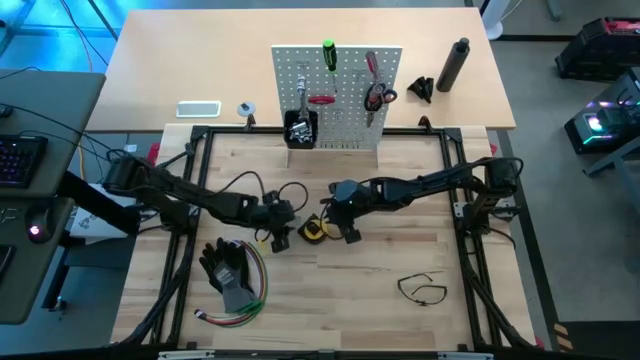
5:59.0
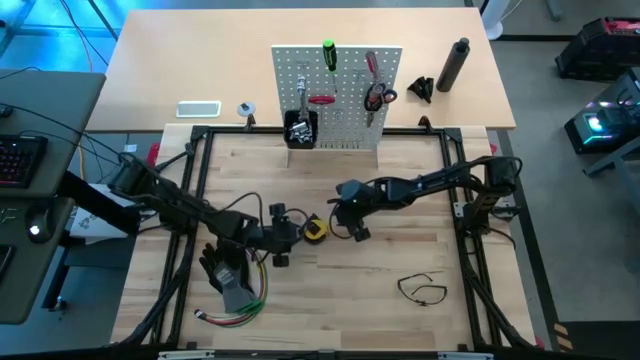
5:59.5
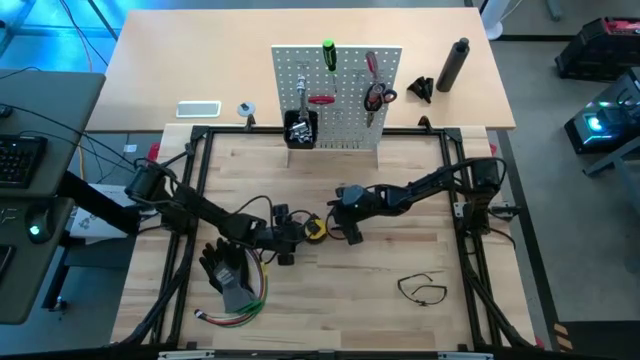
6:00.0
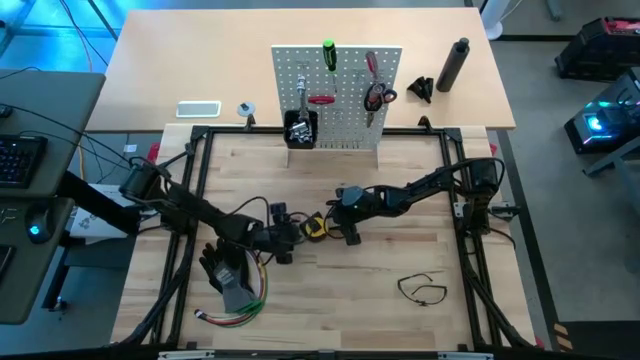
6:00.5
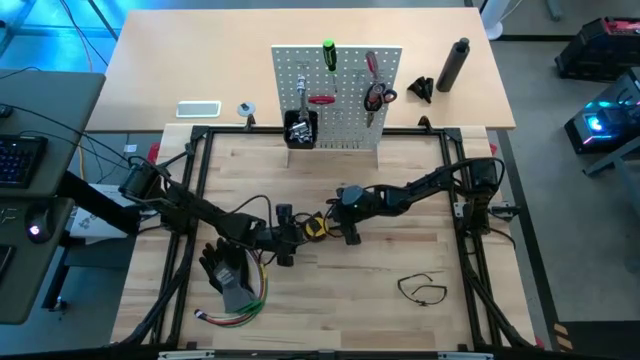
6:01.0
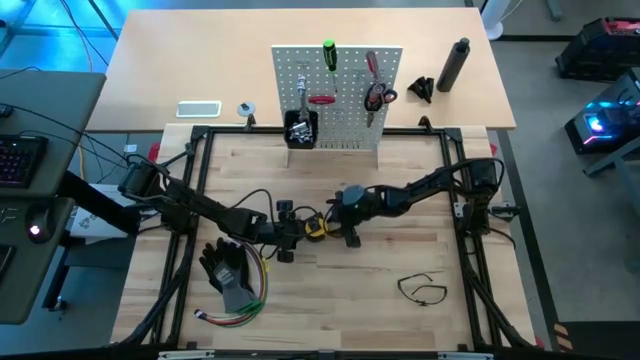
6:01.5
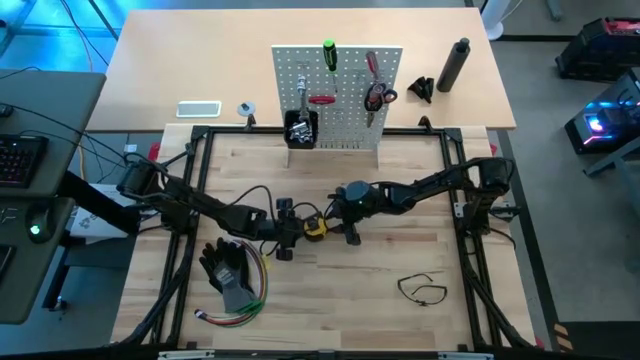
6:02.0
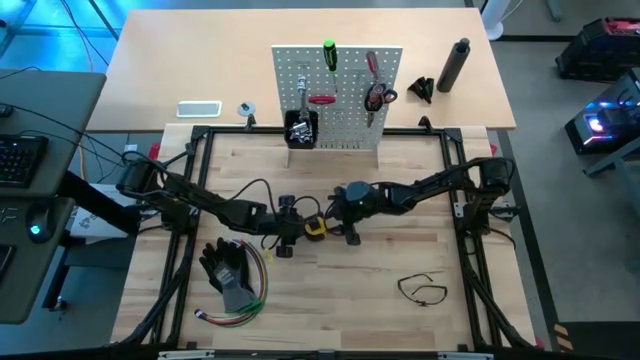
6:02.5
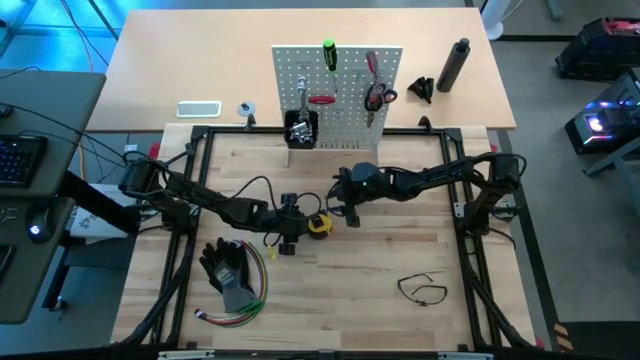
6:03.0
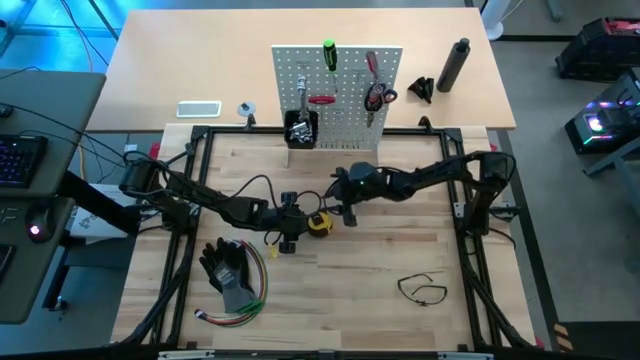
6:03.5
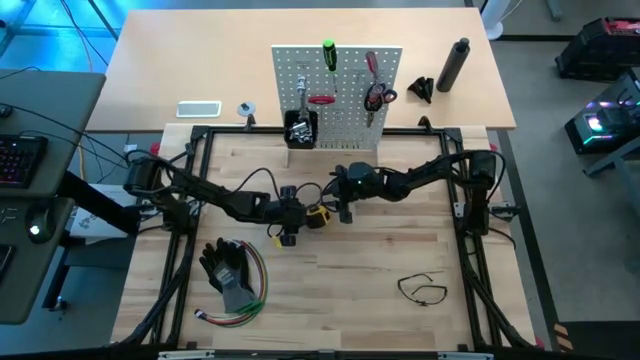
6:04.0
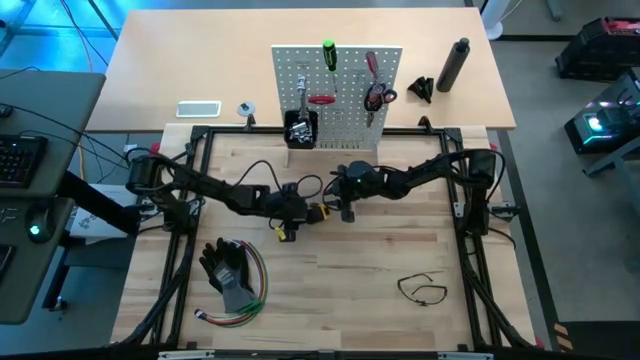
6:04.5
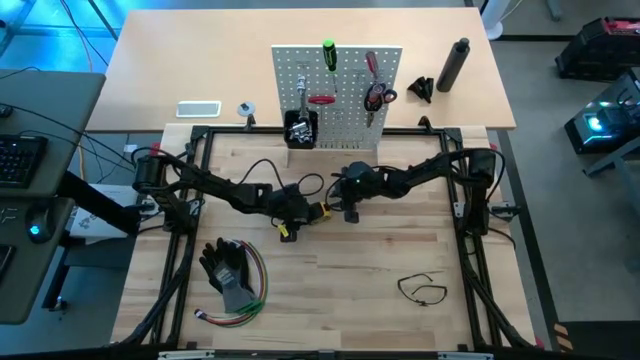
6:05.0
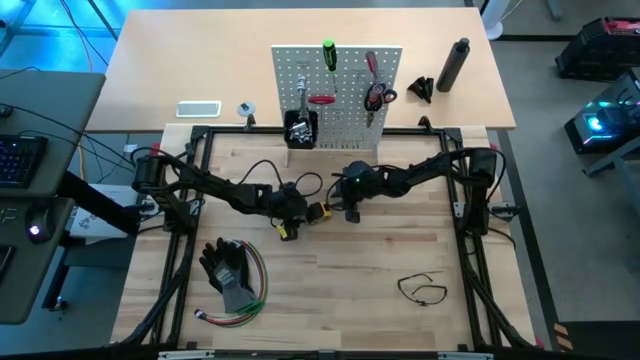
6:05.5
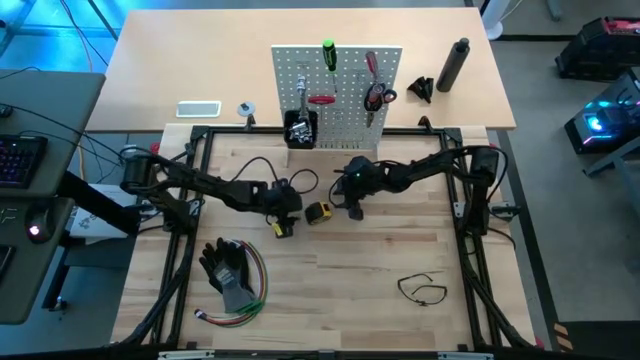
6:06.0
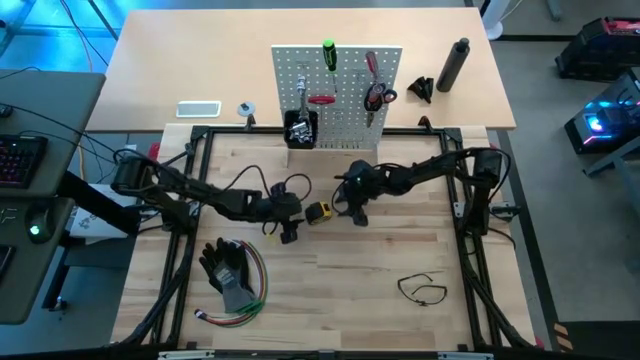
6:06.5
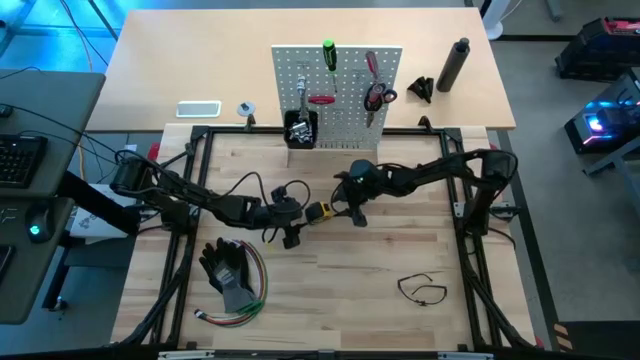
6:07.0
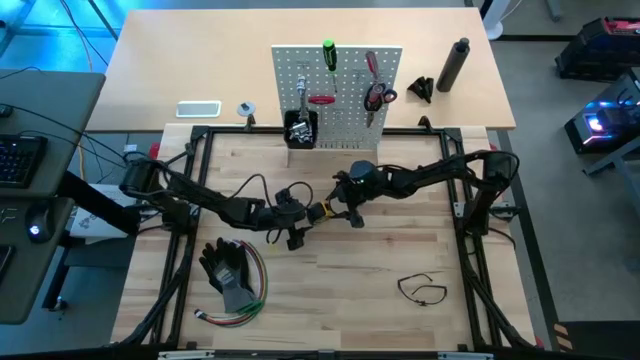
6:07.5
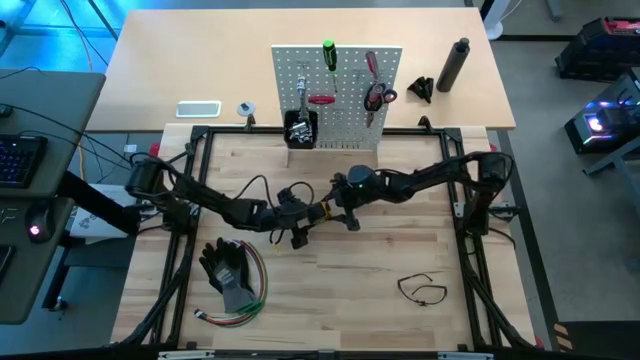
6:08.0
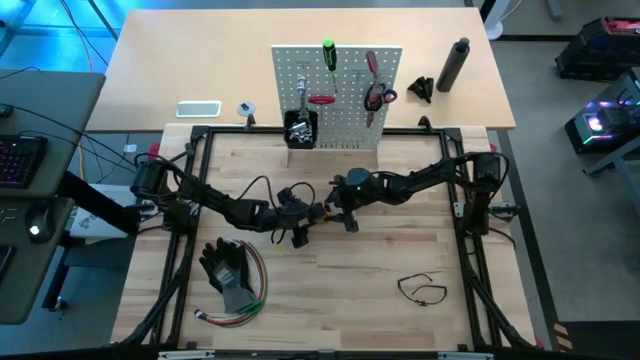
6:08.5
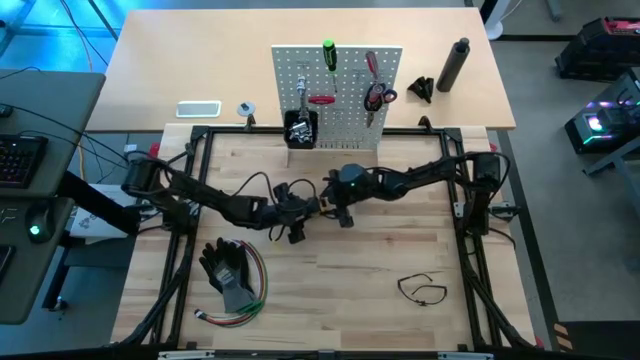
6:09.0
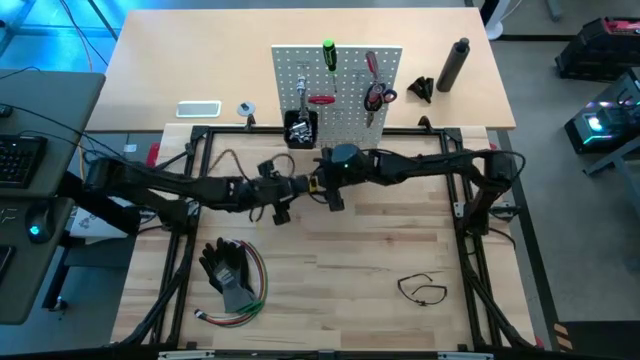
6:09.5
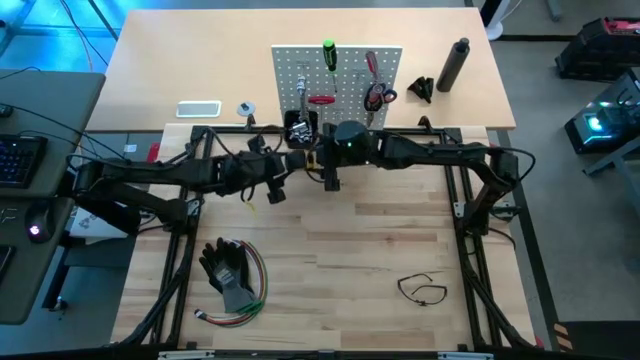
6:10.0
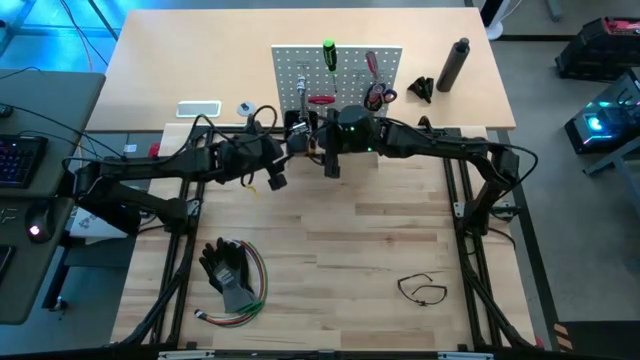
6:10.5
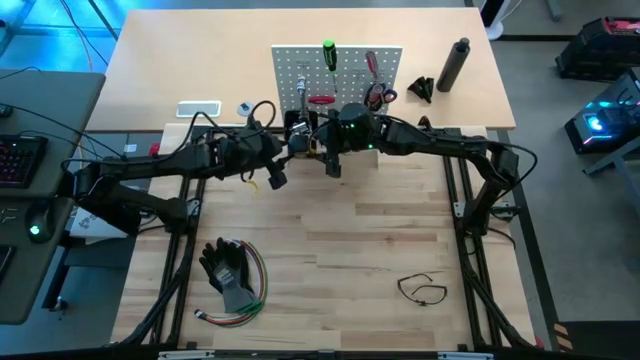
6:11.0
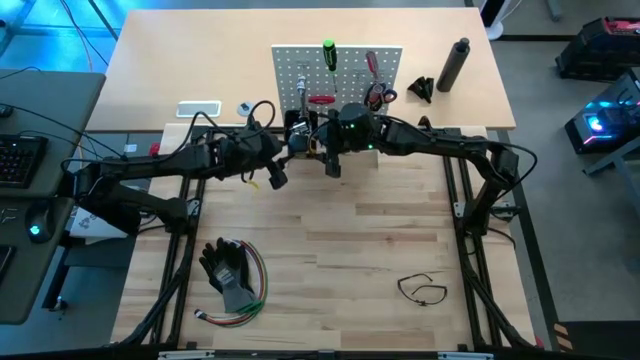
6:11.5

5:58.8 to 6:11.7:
Task: Hang tools onto peg board
Hang the yellow tape measure on the black bin on the white peg board

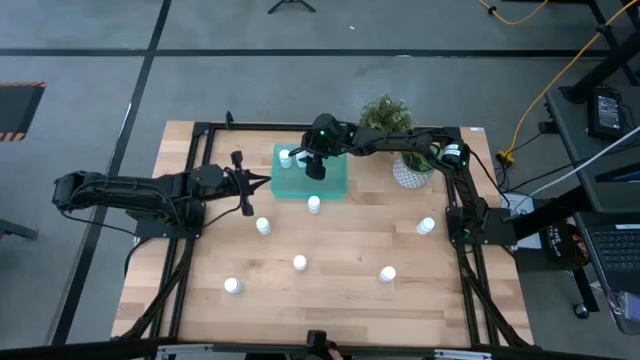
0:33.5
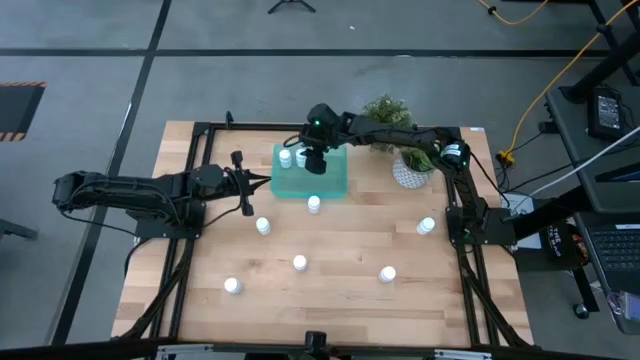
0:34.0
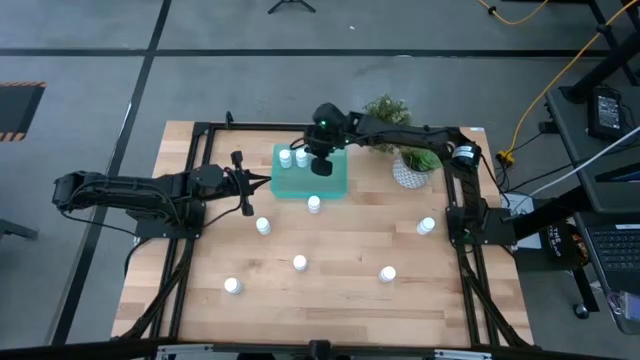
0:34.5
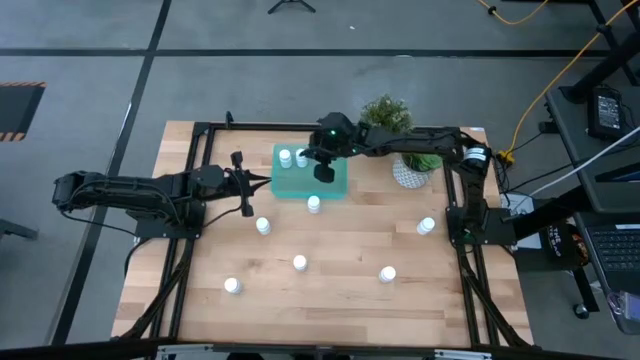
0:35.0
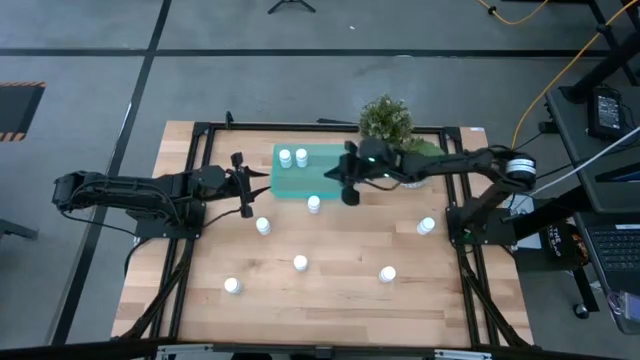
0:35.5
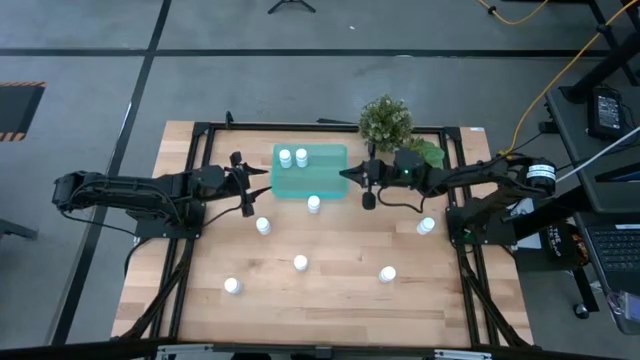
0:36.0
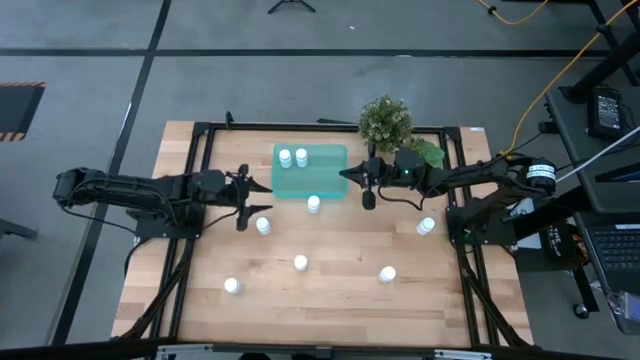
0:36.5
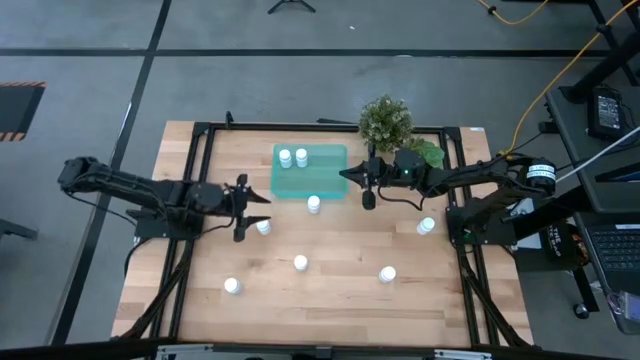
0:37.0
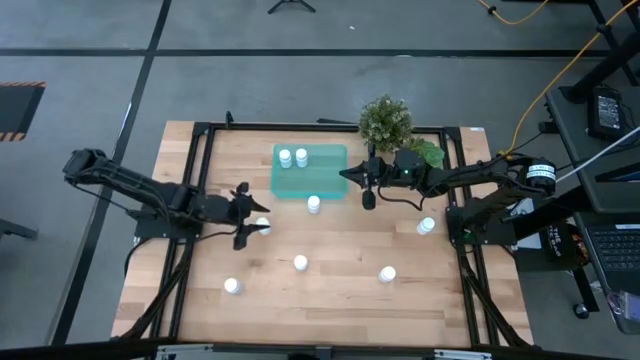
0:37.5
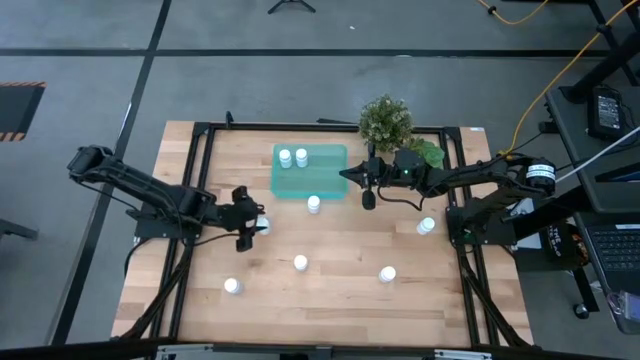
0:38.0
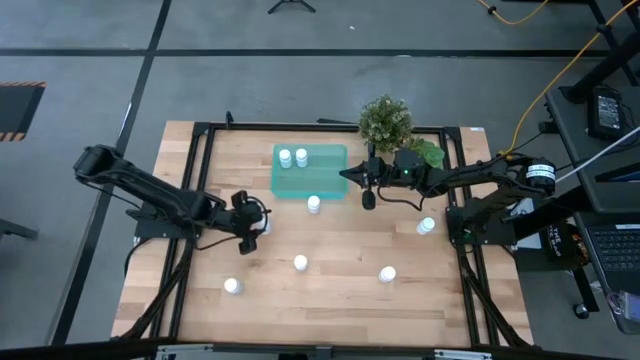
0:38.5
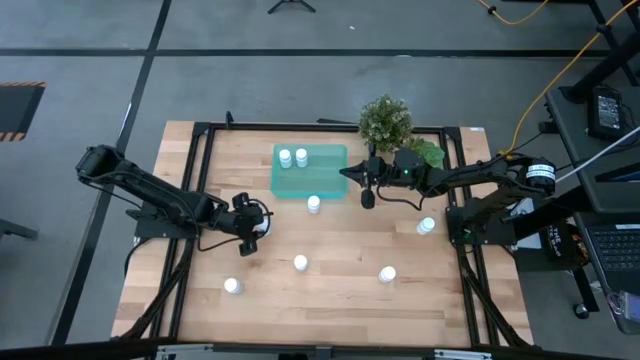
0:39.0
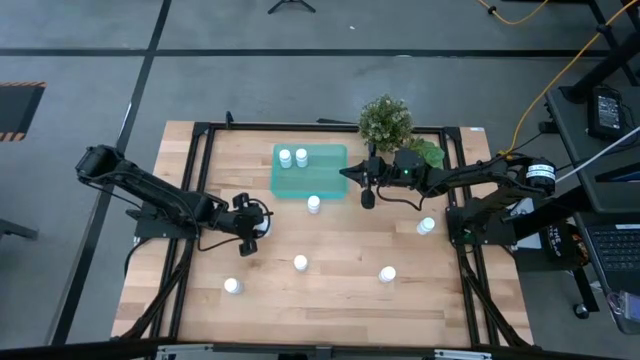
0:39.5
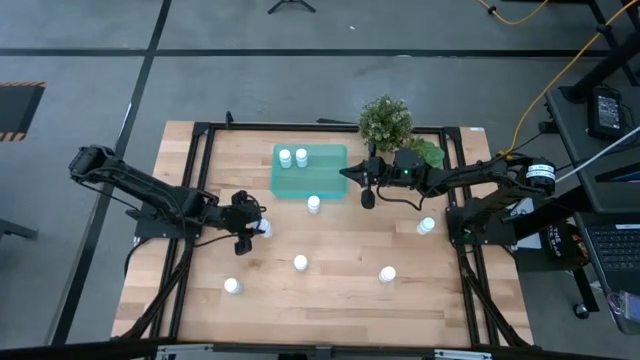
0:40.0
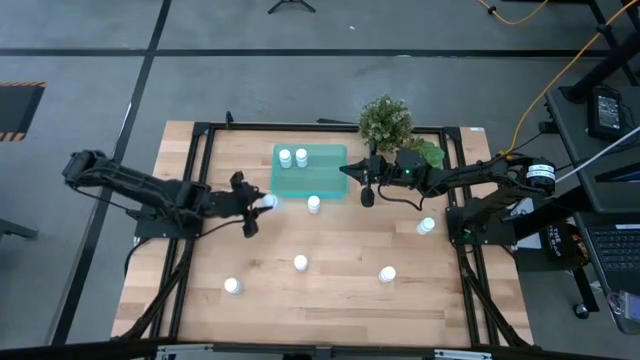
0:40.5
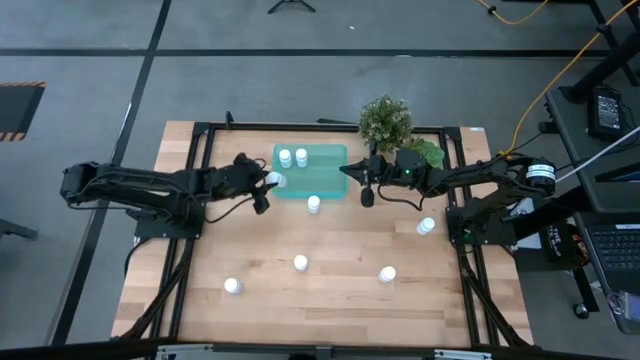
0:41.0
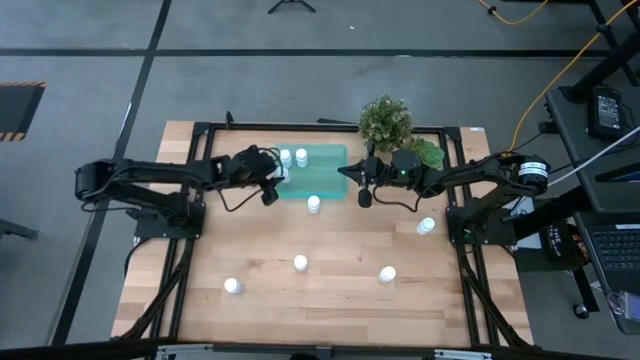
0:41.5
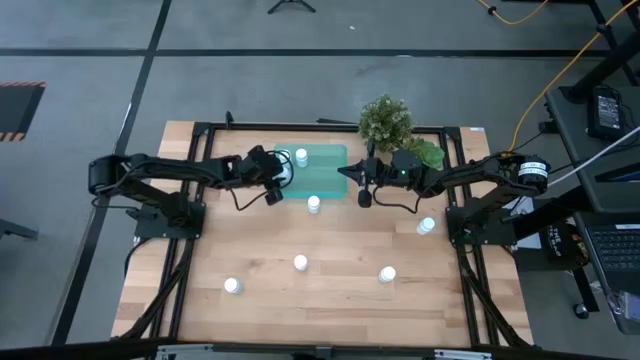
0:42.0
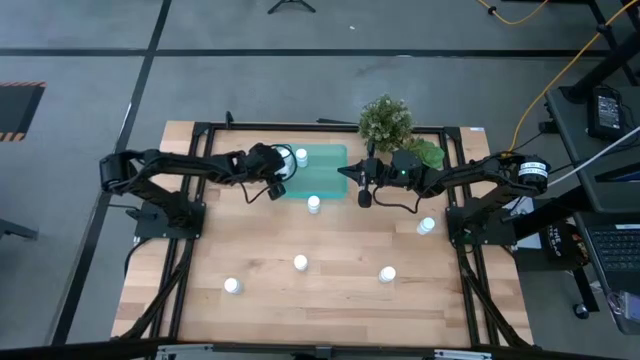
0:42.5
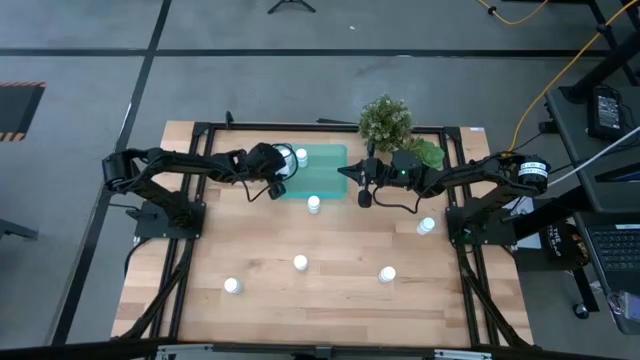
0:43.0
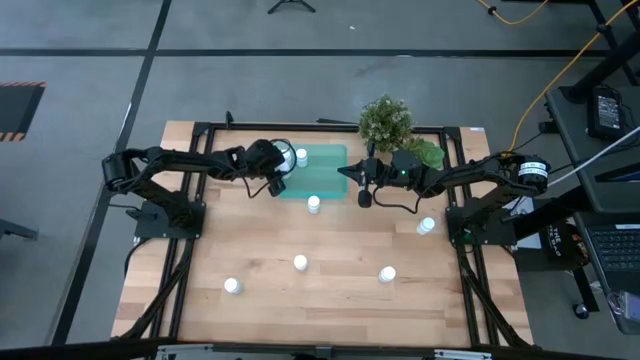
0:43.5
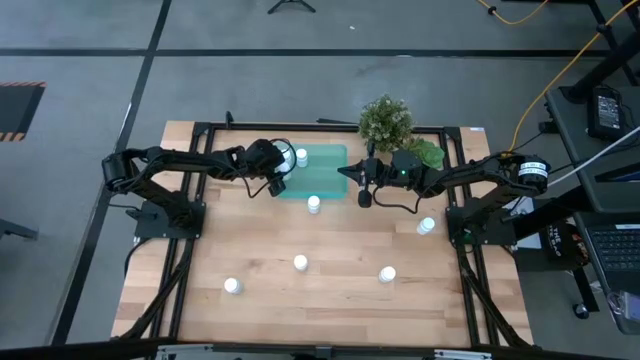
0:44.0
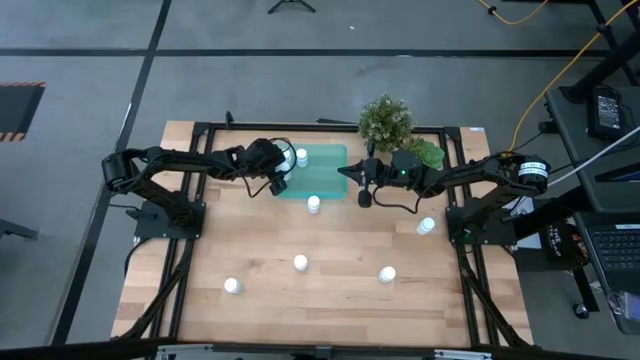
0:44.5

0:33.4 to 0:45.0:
Task: Pick and place pill bottles into a basket
Put the white pill bottle into the green bin
